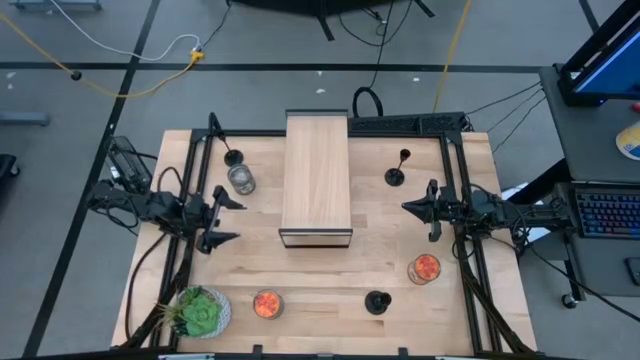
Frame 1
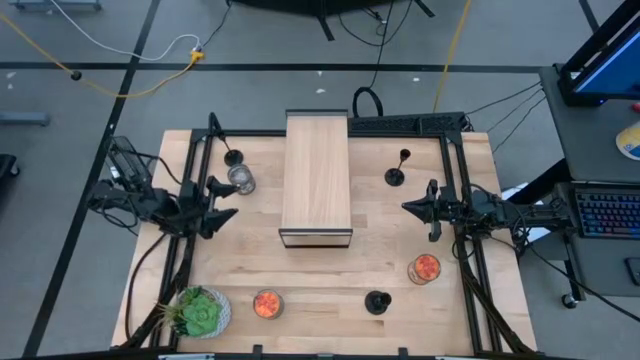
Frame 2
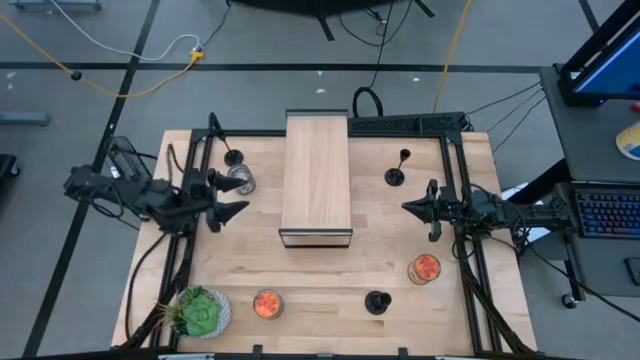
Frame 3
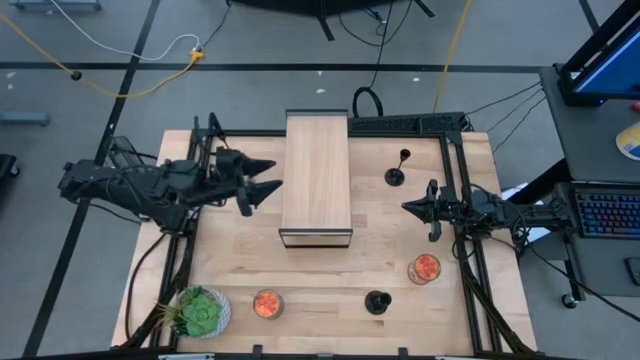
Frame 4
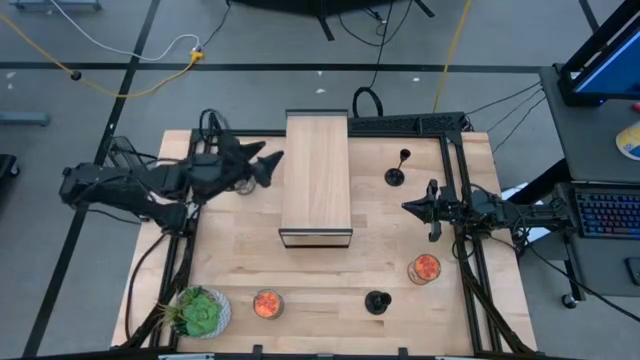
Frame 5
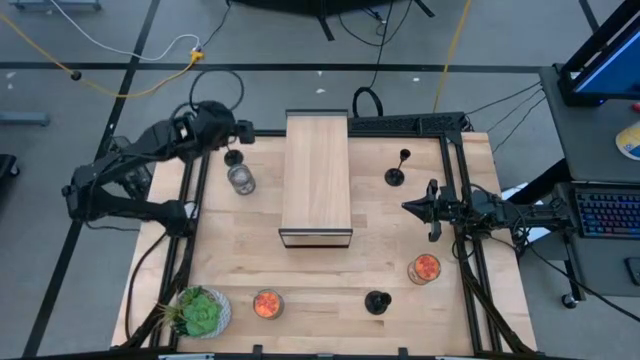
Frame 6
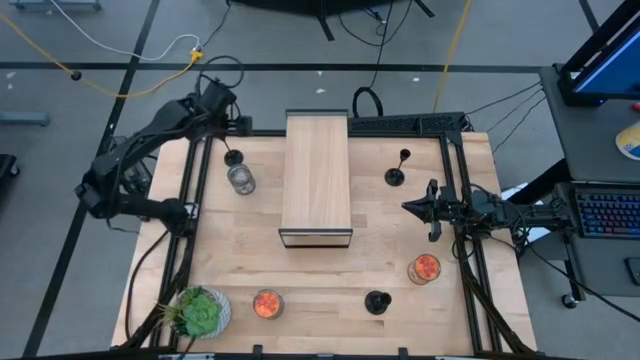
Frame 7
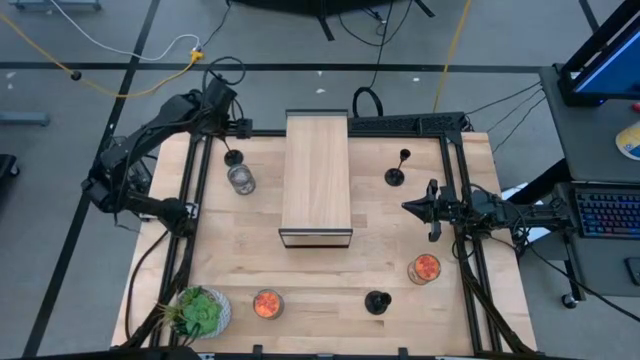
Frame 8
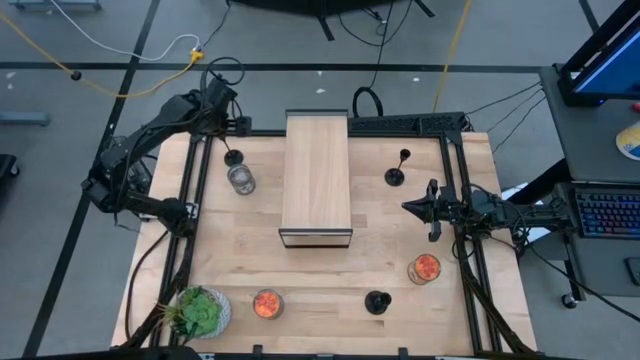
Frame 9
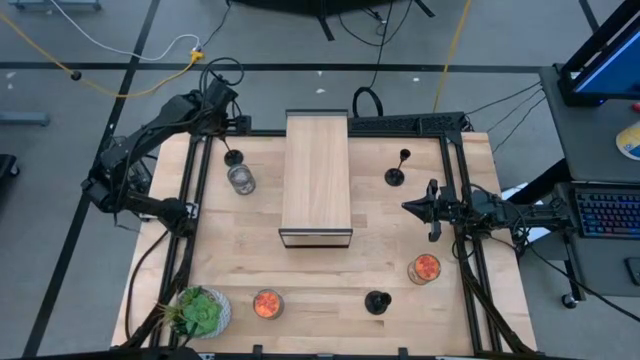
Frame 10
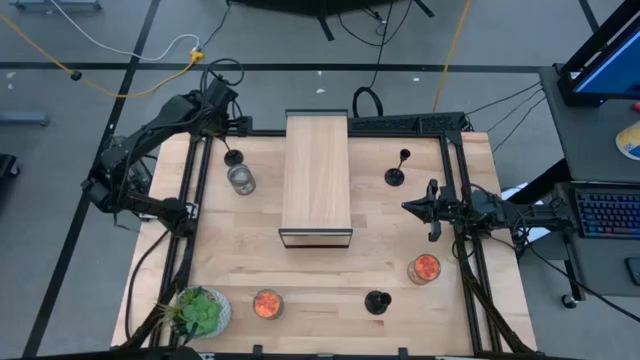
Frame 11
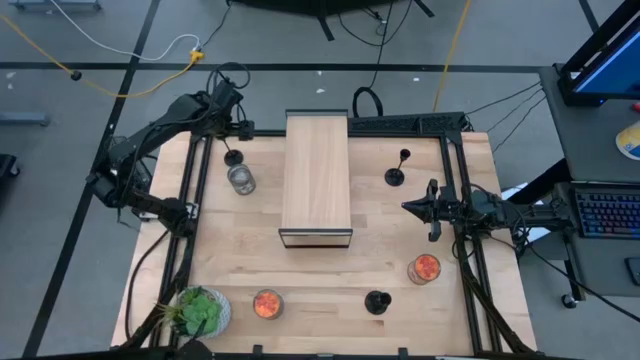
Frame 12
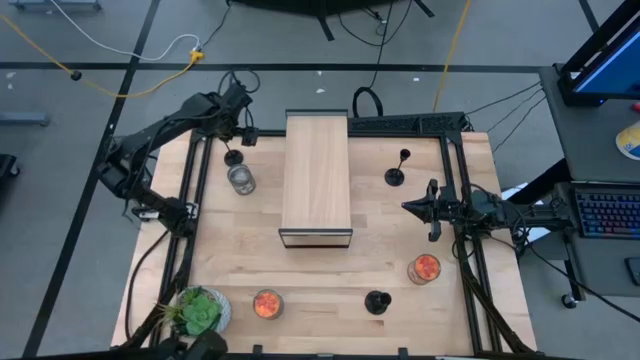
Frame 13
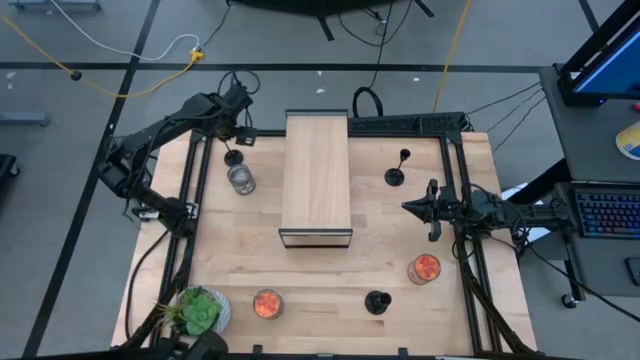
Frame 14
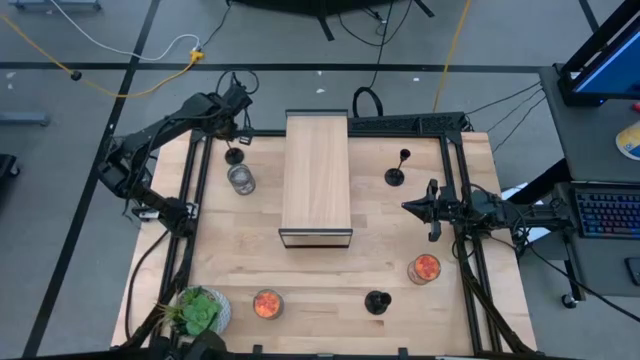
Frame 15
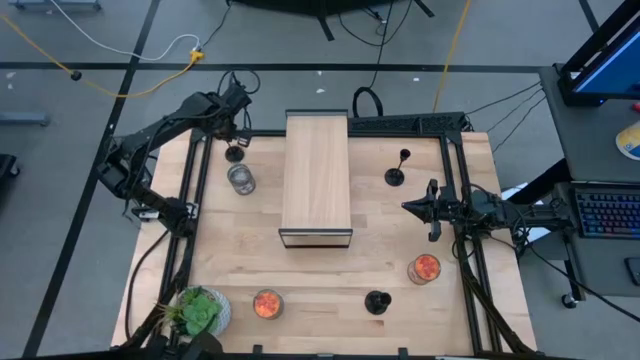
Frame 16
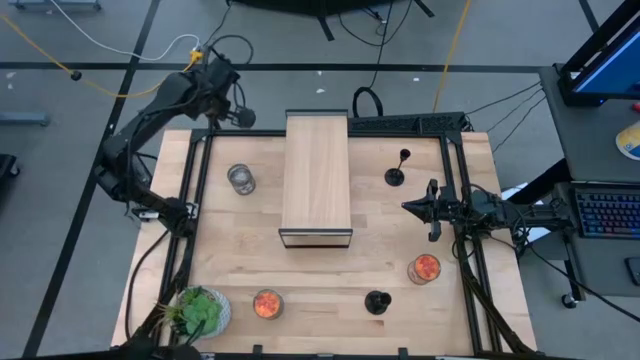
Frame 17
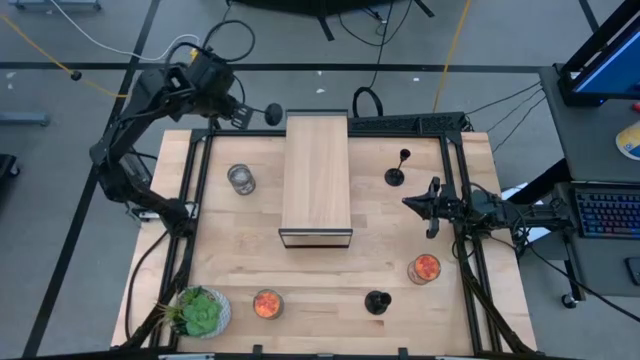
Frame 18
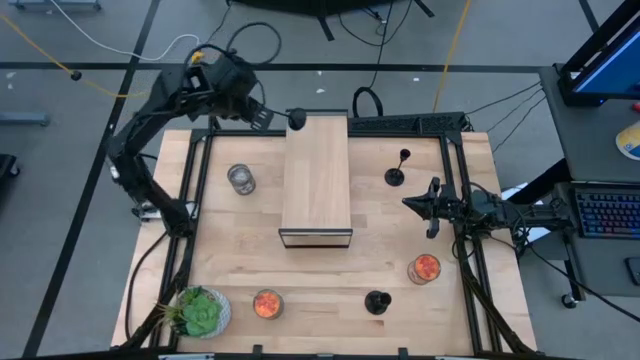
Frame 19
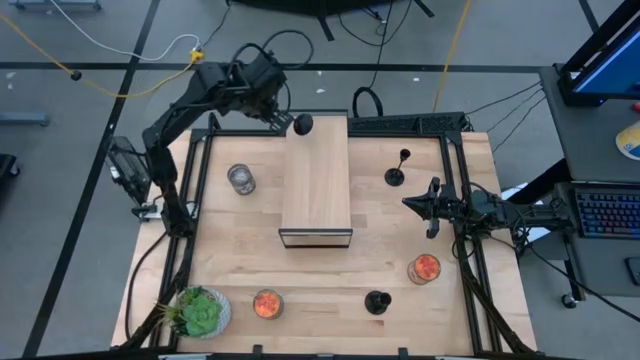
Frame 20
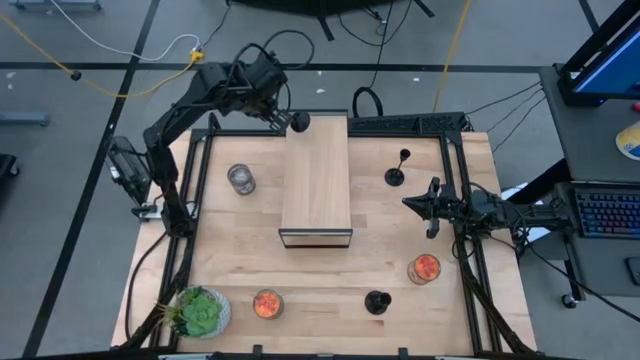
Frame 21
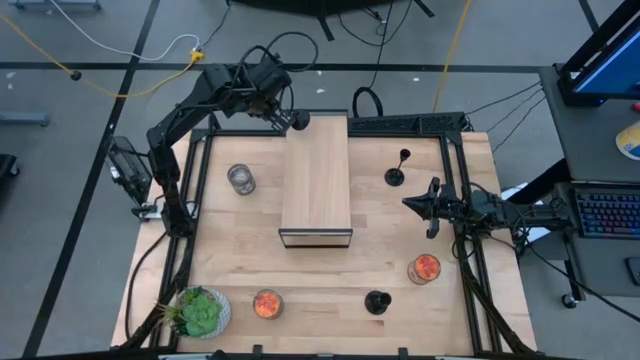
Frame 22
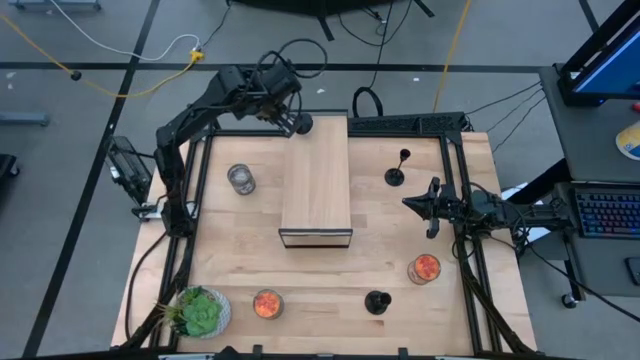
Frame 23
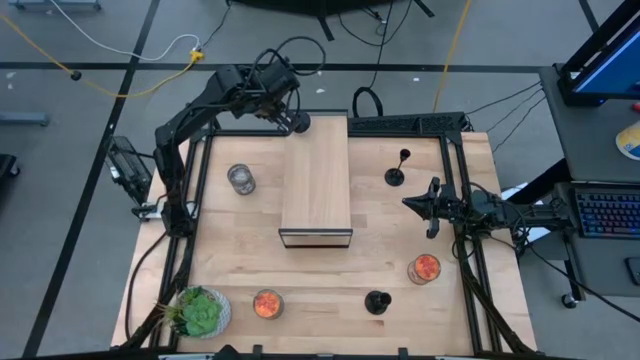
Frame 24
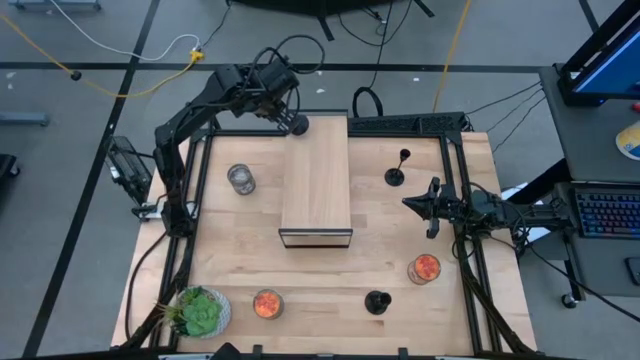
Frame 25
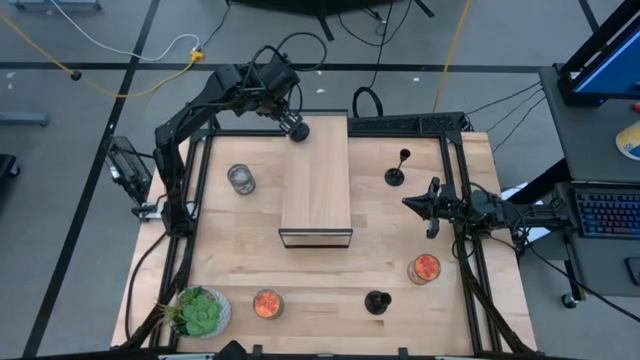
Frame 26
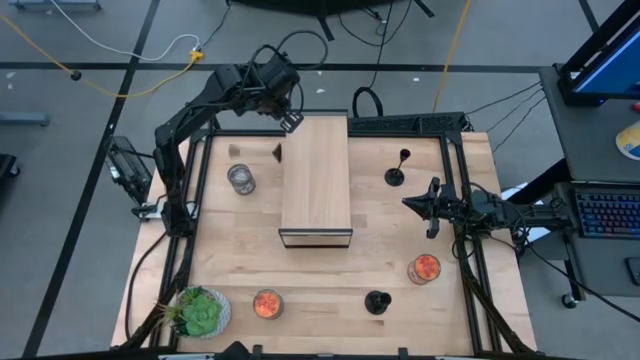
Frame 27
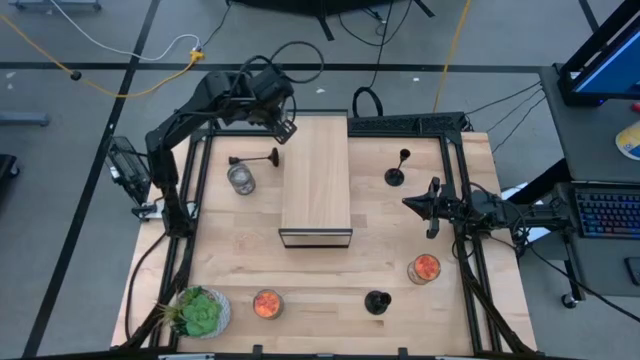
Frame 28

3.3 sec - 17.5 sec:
Task: Pick & Place candle stick holders
Put the top left black candle holder on the shelf
